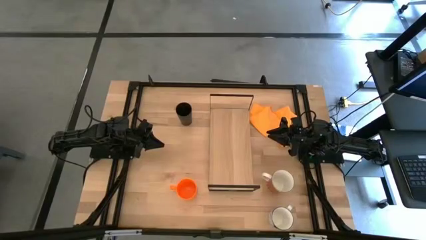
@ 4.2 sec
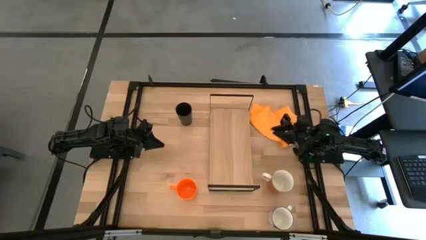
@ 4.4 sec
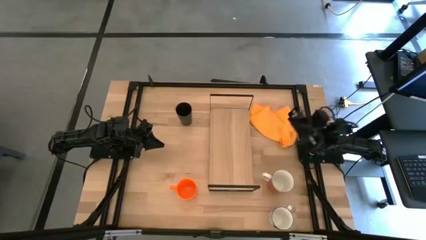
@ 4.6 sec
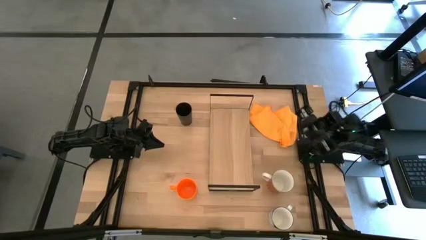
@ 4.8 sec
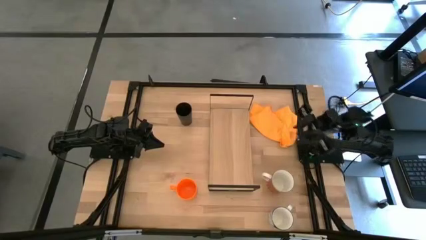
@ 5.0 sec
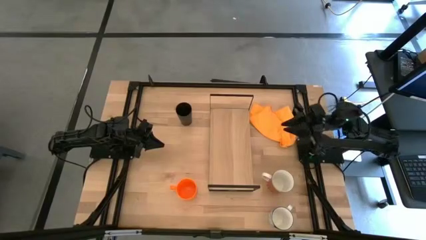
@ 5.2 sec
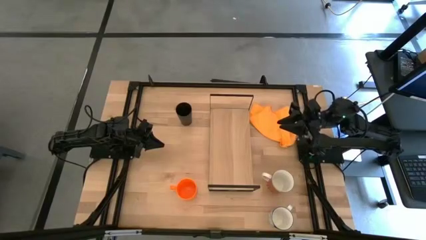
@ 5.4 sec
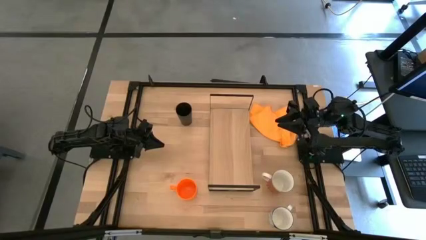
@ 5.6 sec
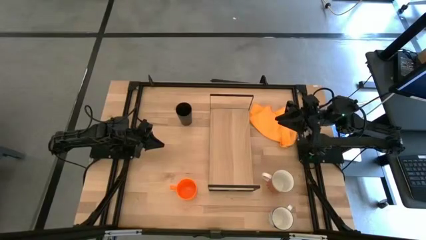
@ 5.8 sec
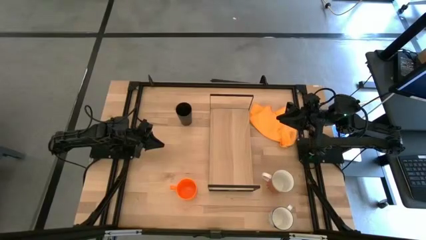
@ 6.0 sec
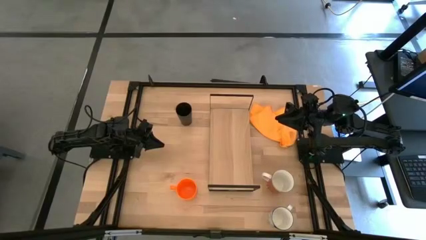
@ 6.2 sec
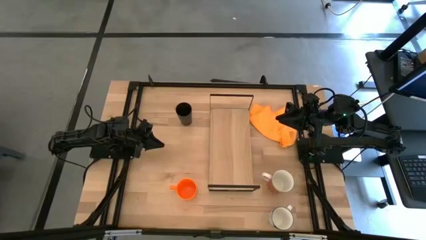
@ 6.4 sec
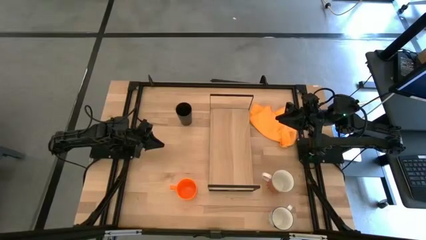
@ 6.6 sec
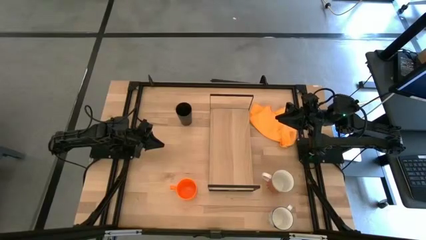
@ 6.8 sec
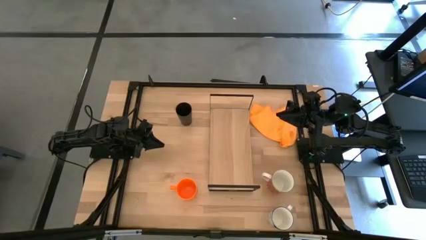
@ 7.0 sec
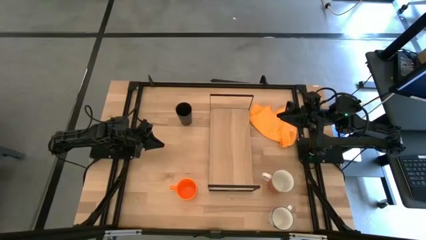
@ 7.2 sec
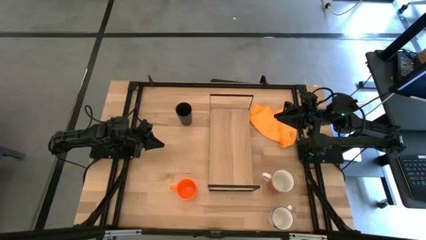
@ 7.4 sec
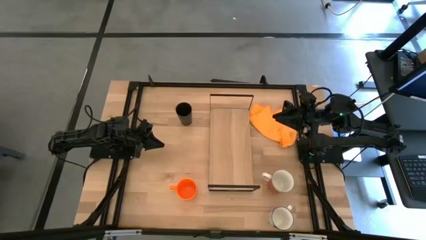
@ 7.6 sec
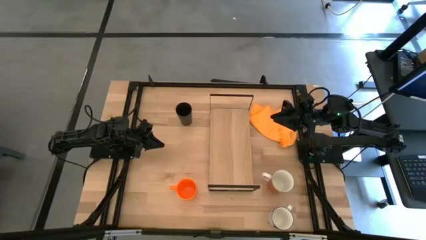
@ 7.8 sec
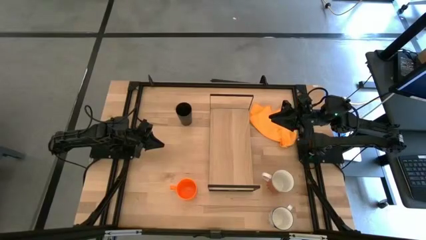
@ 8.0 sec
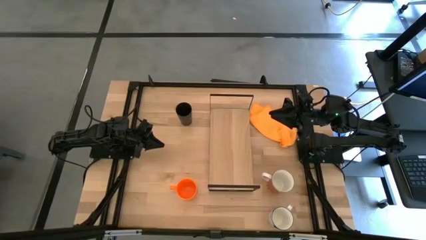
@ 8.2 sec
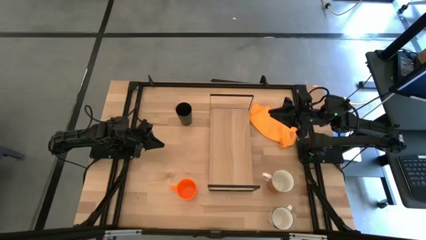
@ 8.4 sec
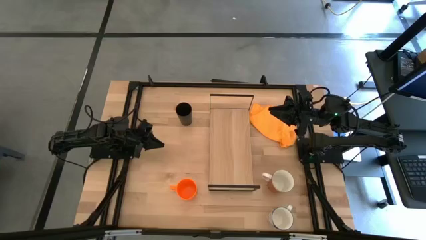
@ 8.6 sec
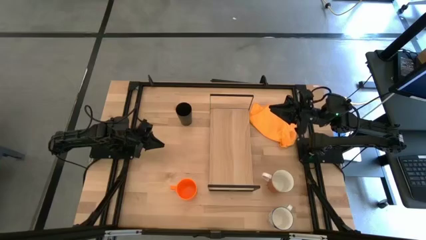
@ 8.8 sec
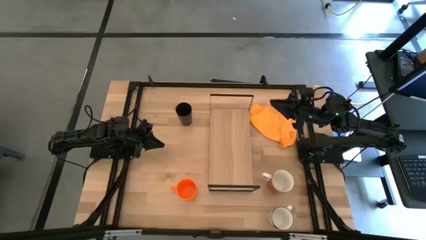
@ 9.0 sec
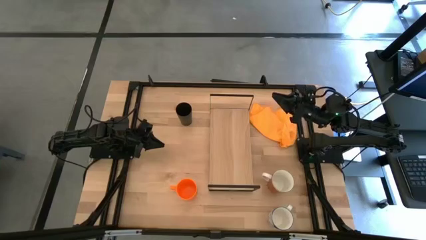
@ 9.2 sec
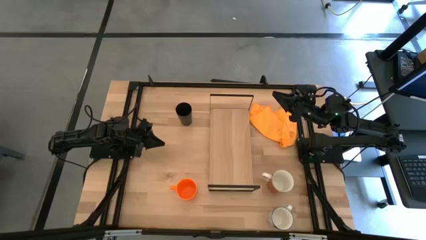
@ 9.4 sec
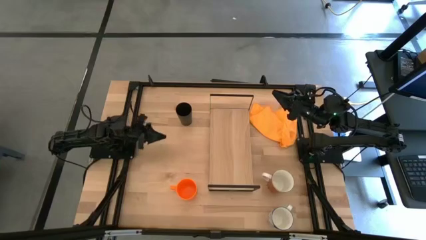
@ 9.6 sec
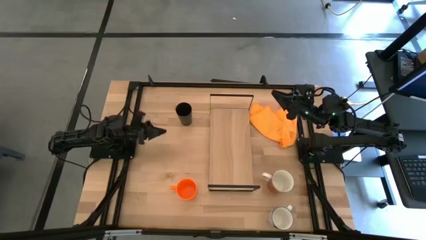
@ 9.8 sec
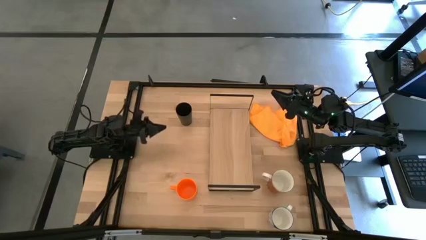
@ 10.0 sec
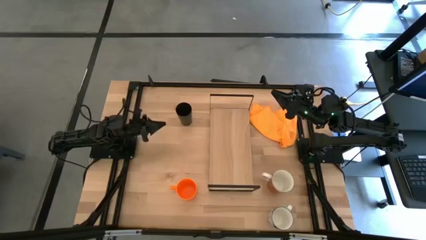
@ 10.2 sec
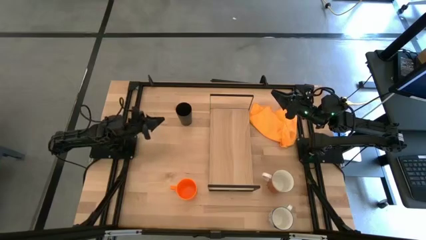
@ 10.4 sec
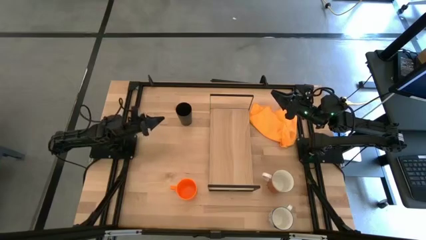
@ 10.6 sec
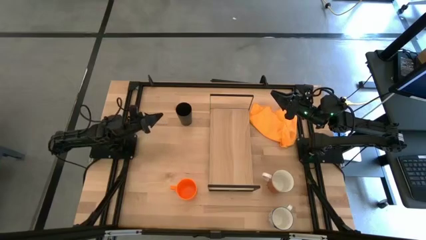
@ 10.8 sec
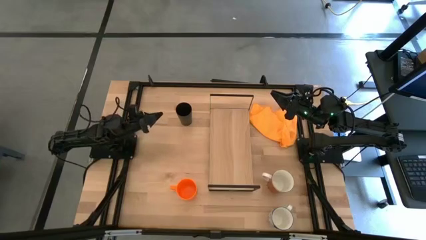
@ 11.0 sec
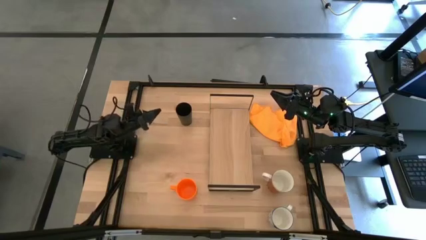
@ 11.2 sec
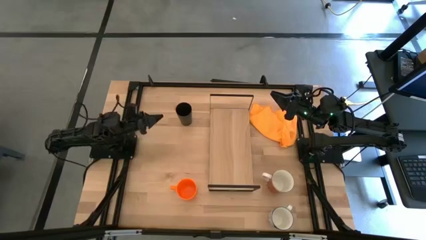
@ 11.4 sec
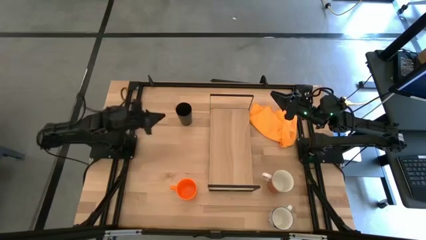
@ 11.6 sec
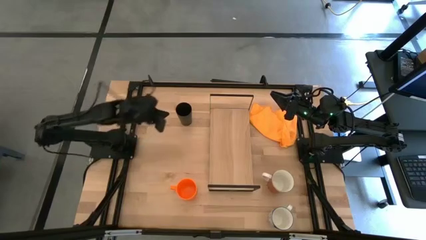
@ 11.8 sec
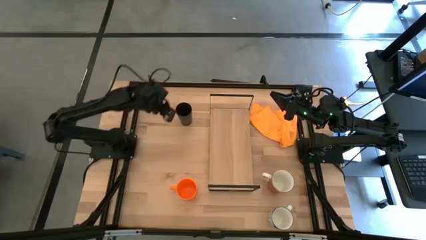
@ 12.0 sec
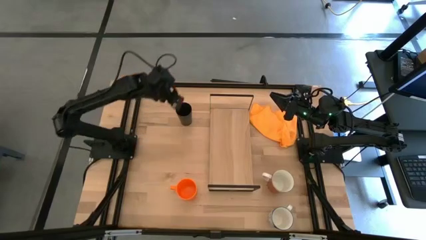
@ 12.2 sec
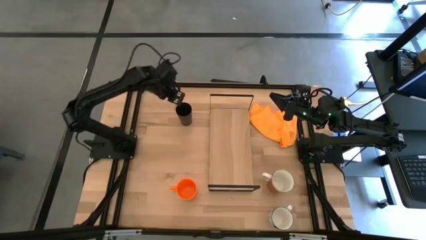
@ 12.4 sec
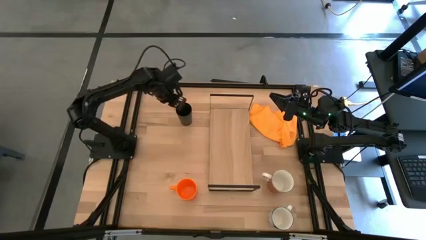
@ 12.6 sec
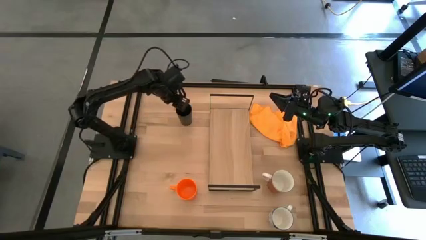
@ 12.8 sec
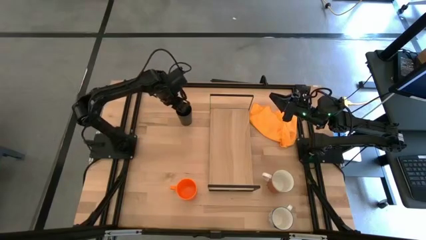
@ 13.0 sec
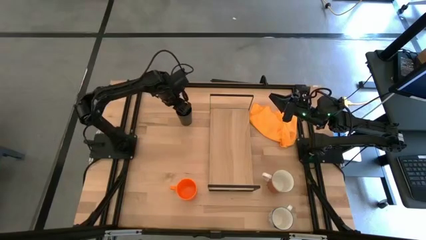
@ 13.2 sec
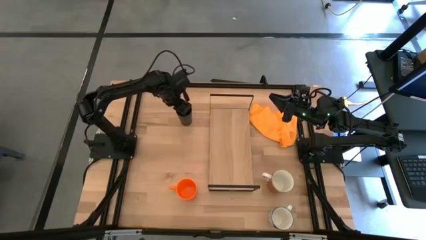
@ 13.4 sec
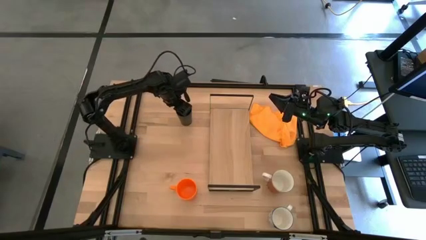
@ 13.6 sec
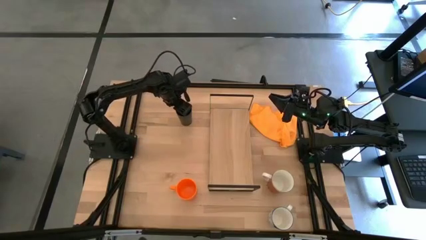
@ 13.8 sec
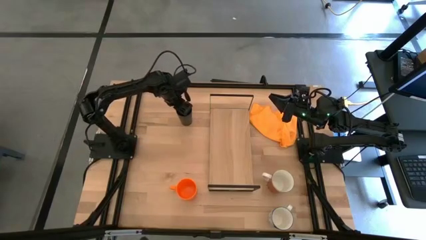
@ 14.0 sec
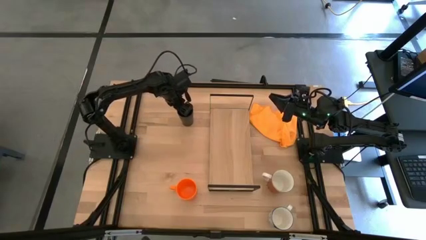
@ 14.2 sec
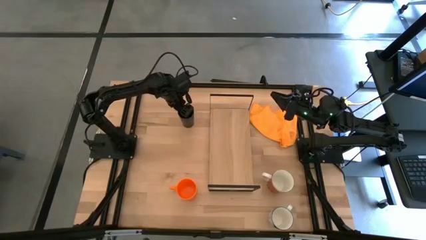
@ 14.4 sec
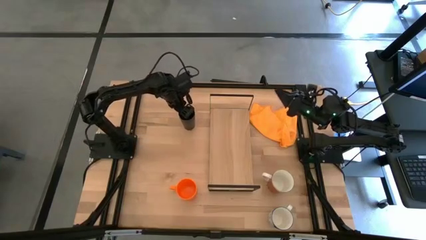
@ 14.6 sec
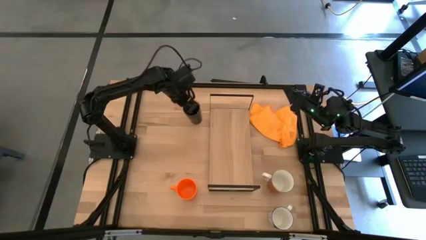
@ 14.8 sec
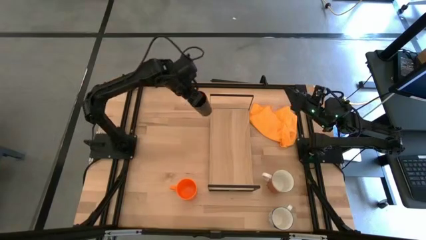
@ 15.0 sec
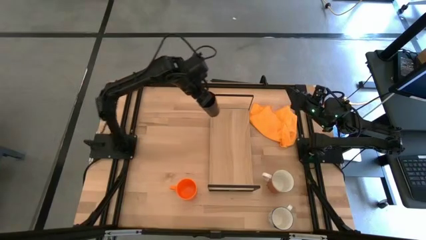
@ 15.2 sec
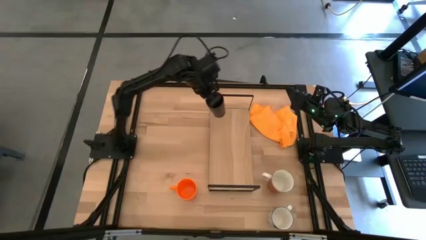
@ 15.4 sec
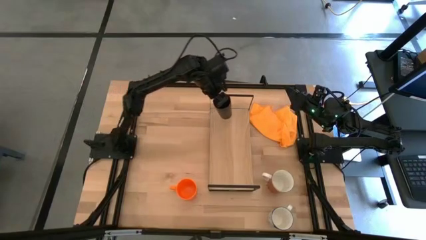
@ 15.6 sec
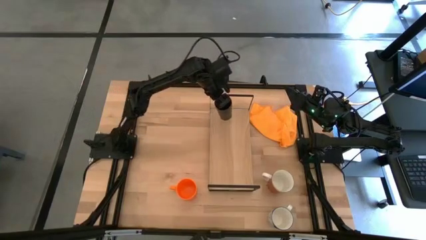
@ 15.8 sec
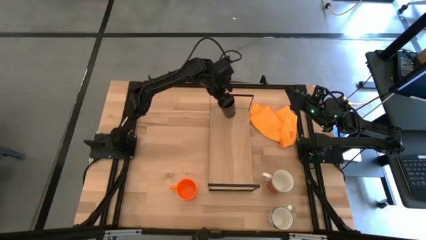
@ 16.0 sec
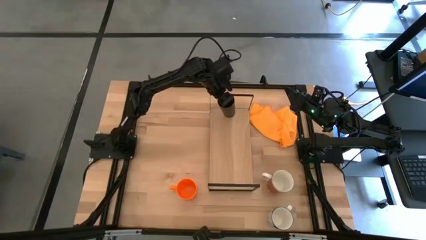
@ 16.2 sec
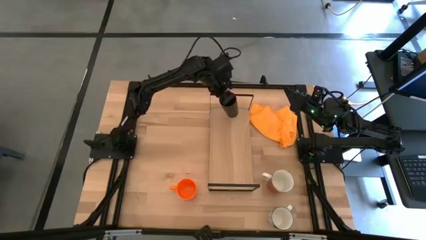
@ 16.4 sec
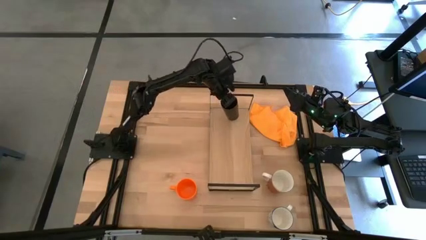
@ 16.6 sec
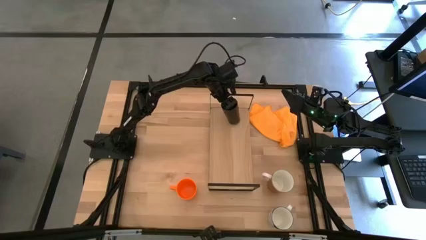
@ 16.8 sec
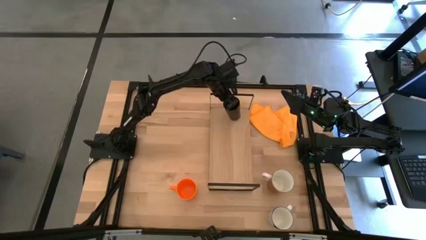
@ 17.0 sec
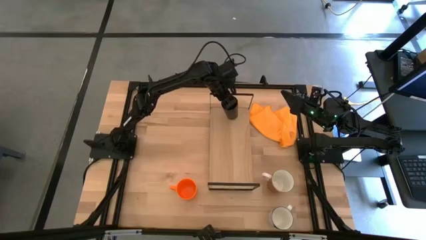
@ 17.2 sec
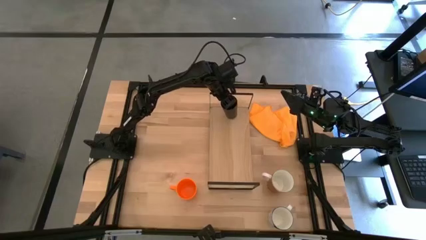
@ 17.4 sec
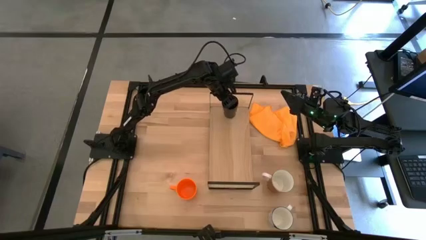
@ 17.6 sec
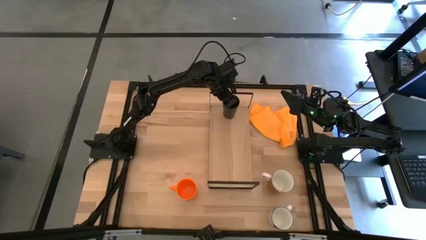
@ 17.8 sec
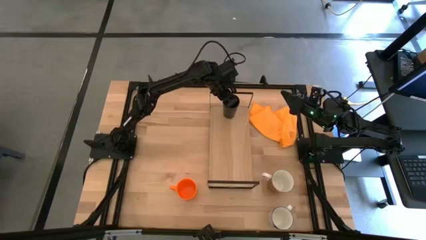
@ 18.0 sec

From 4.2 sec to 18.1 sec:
Task: Stack small to large cups/mugs on shelf
Put the black cup on the shelf
